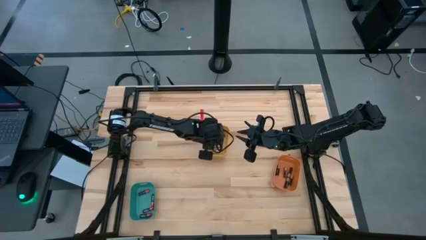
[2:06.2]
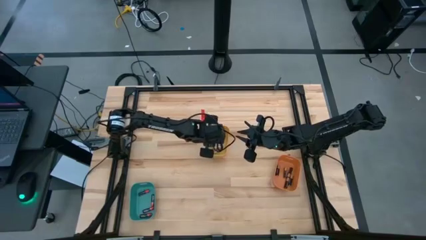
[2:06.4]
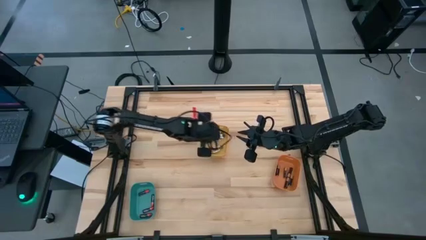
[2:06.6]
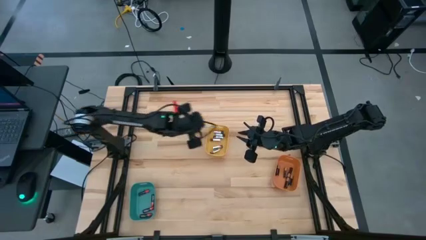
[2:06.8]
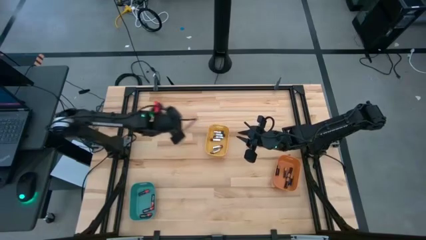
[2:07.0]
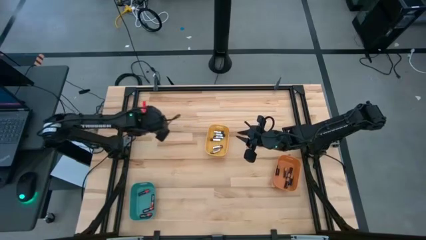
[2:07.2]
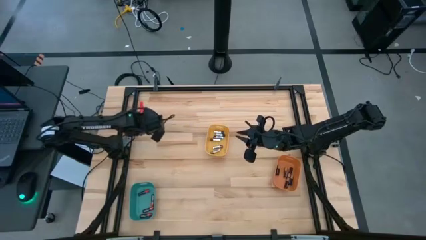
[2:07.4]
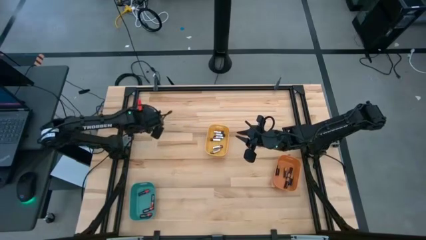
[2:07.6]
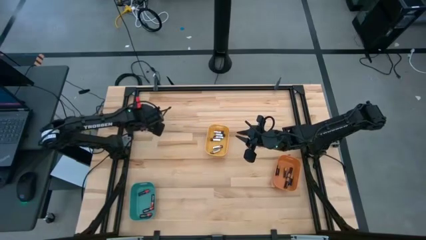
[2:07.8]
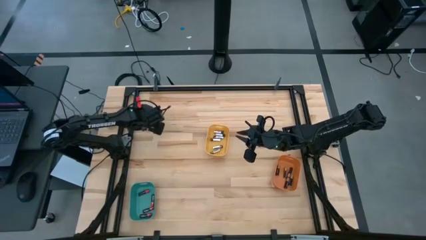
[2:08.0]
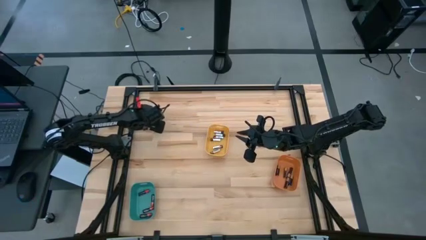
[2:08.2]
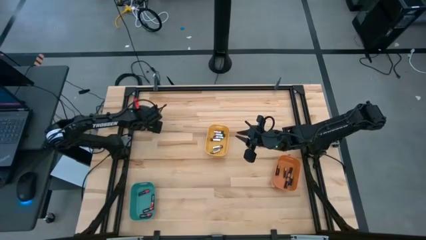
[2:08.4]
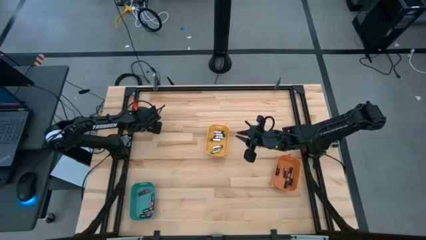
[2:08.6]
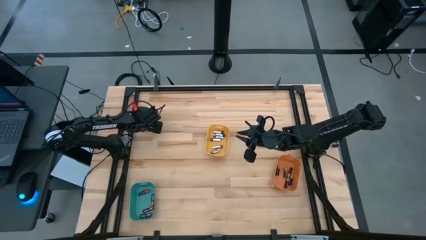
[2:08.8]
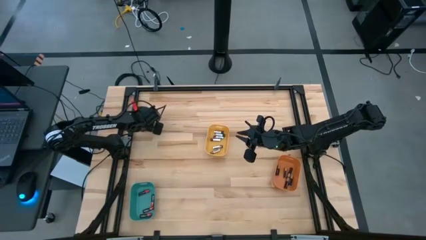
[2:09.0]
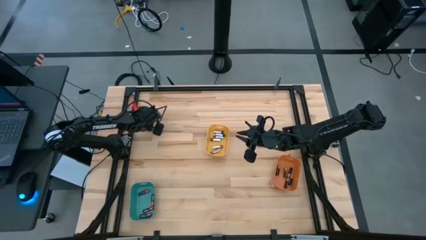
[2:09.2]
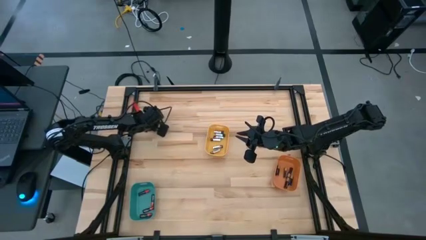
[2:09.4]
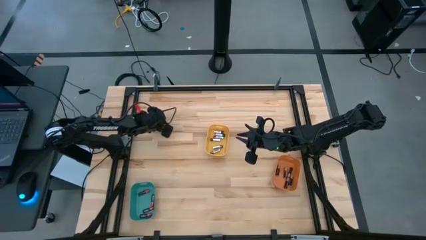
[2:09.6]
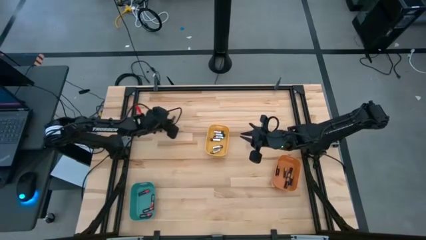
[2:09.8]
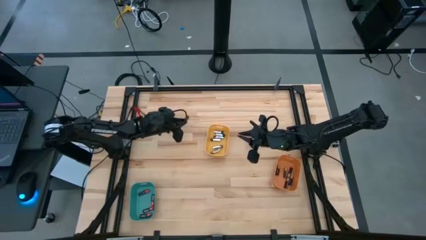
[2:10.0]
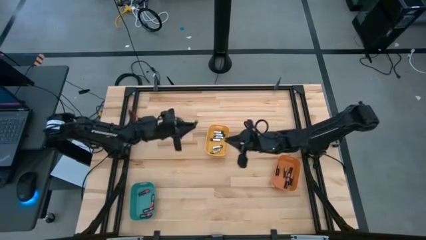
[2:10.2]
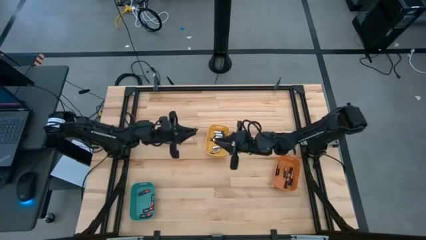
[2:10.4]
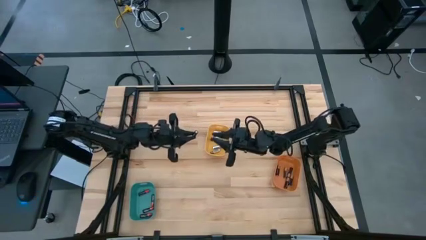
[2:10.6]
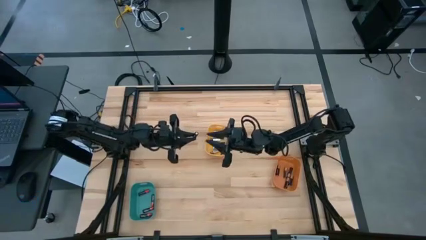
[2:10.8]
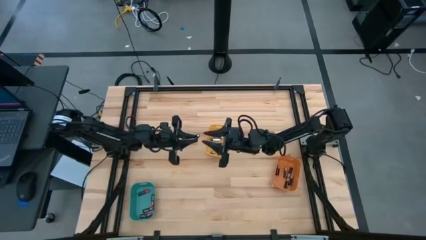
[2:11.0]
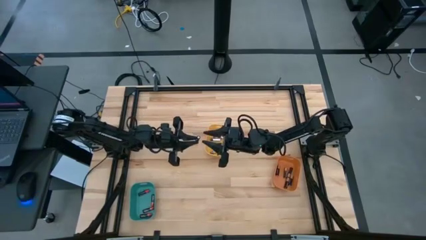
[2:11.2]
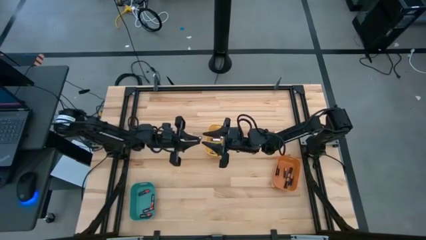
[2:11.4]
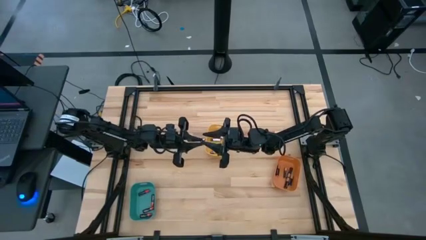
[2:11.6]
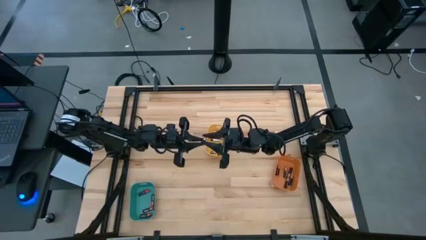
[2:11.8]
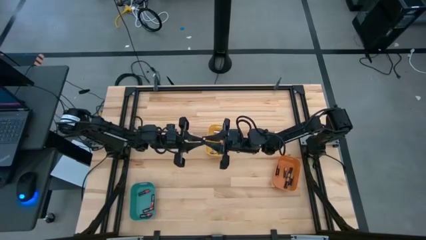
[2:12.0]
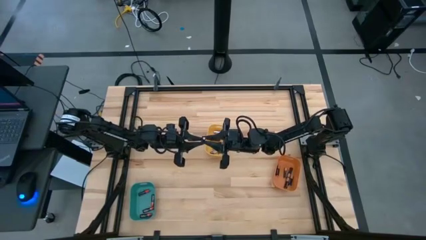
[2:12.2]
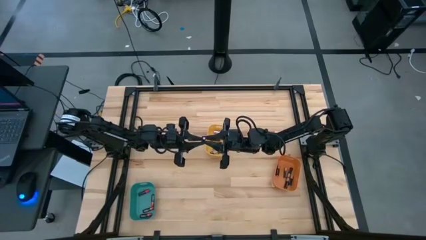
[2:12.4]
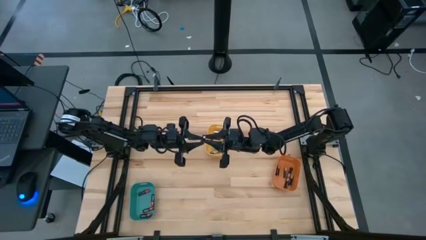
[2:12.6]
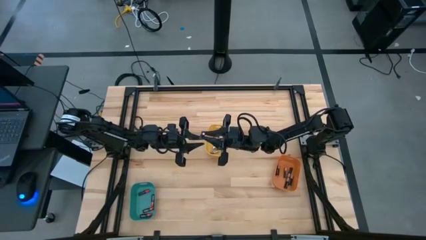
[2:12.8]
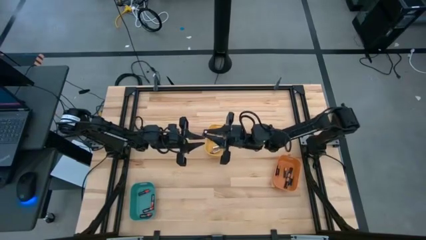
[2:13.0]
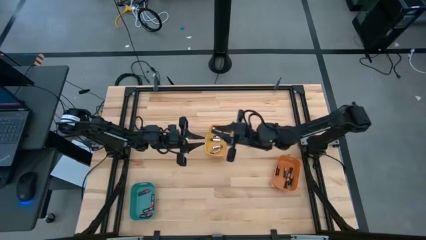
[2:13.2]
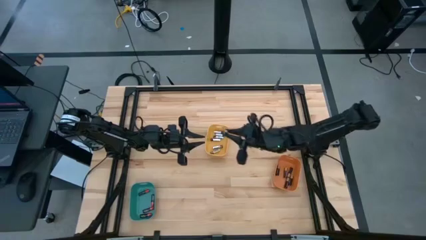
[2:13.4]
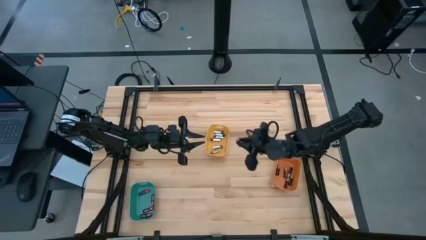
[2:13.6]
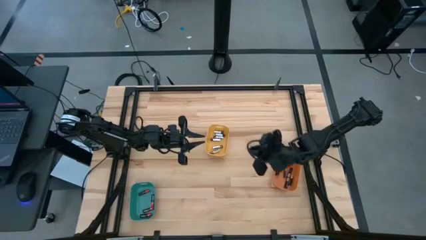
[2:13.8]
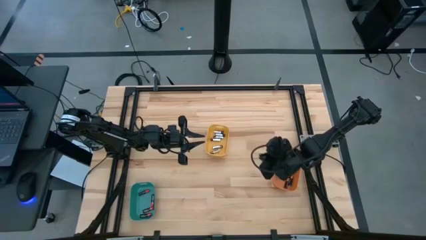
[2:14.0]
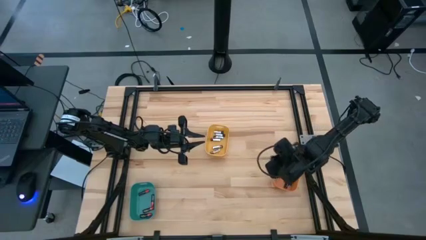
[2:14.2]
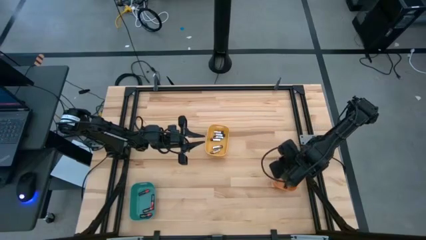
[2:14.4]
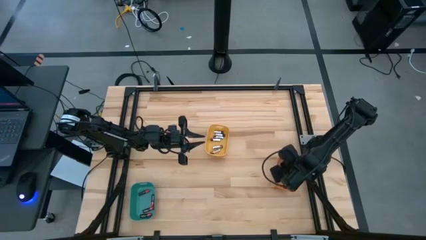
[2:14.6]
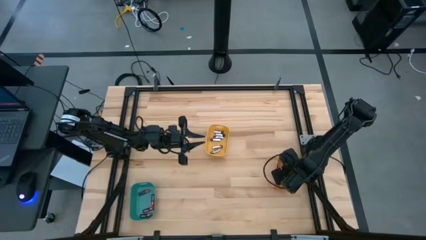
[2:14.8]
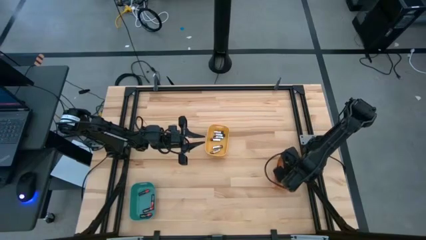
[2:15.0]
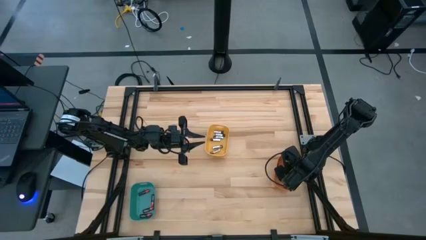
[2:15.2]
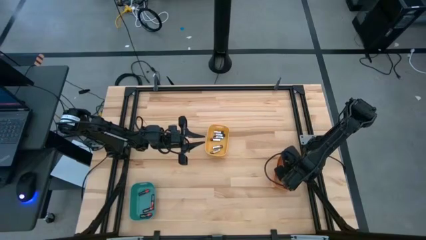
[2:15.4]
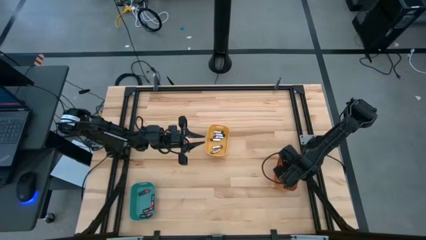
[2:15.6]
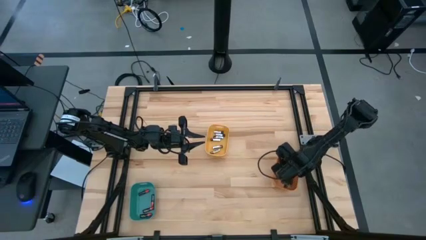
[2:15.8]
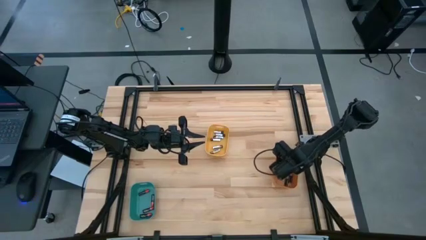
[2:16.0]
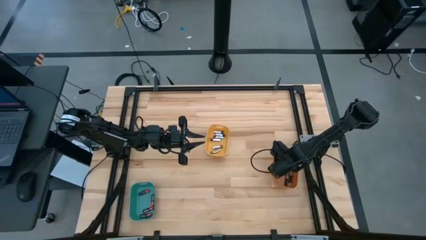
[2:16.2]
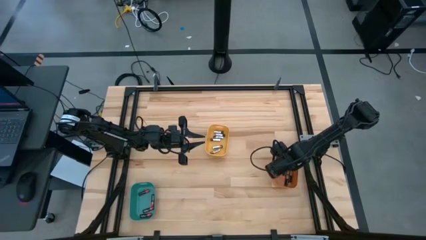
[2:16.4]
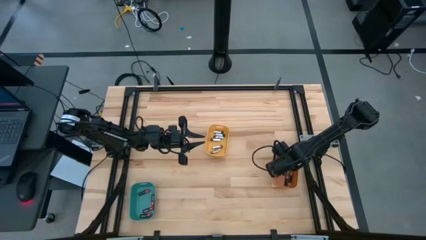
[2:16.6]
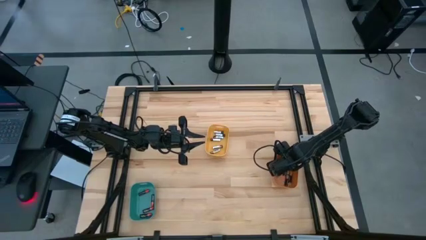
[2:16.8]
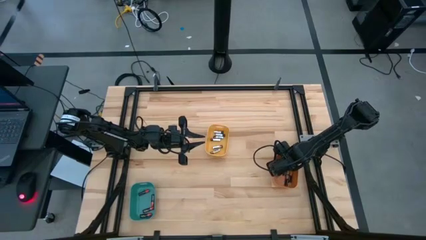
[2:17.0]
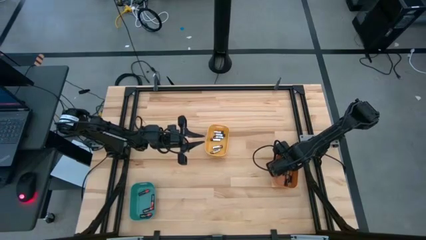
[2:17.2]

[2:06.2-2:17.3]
Task: Sort batteries
Put the brown battery into the orange bin

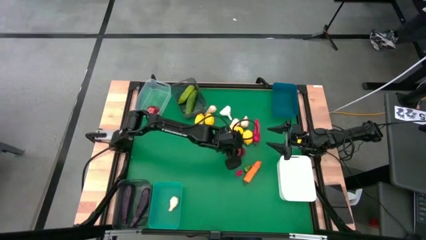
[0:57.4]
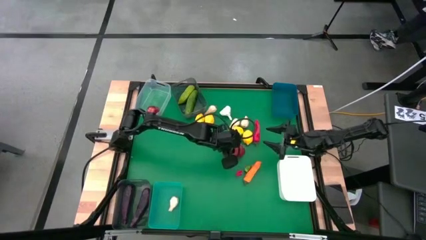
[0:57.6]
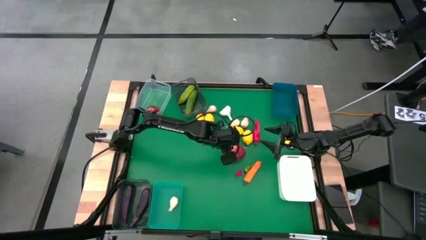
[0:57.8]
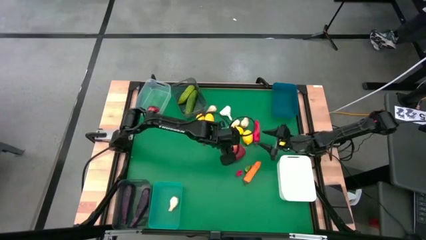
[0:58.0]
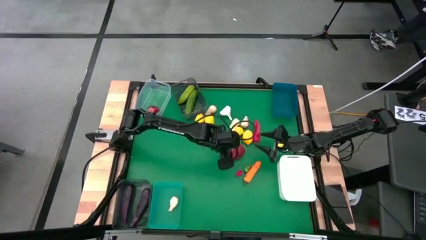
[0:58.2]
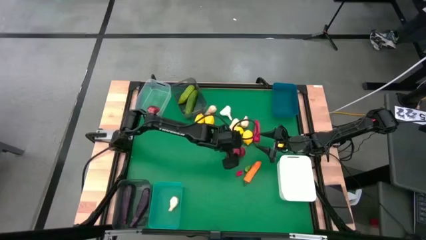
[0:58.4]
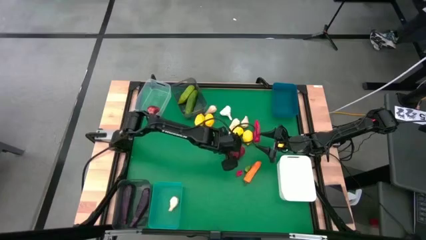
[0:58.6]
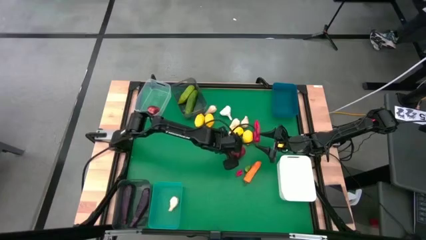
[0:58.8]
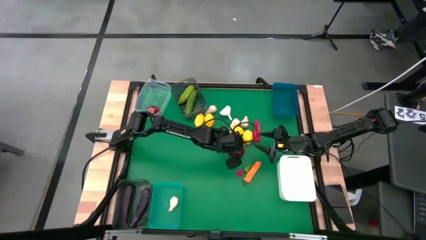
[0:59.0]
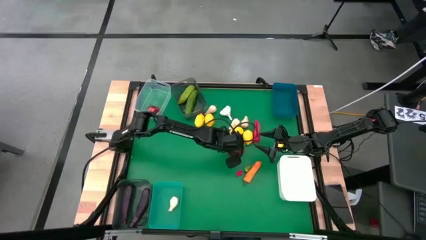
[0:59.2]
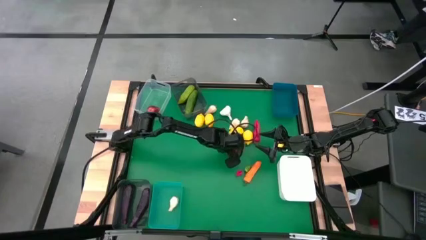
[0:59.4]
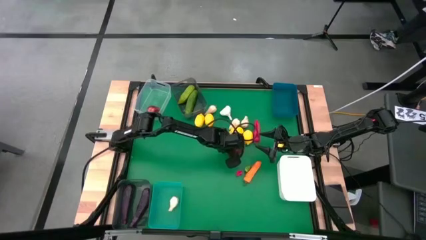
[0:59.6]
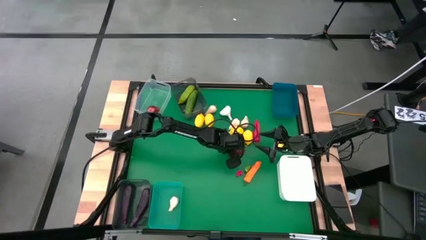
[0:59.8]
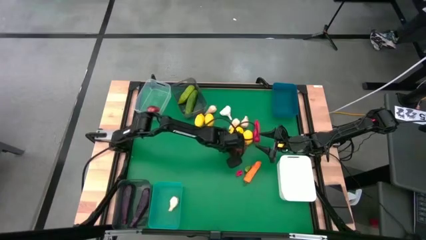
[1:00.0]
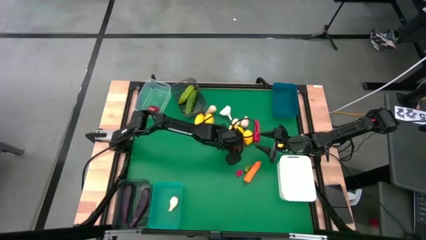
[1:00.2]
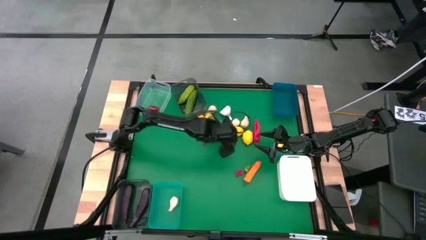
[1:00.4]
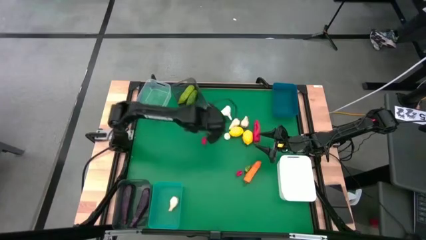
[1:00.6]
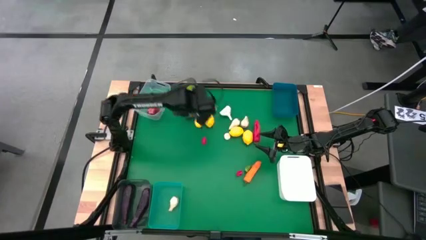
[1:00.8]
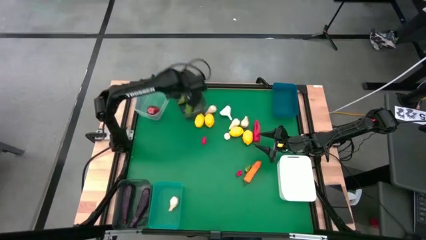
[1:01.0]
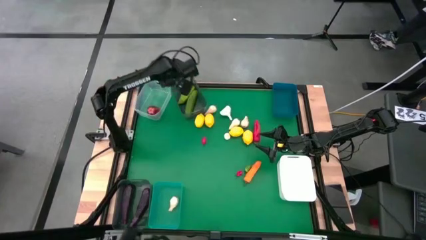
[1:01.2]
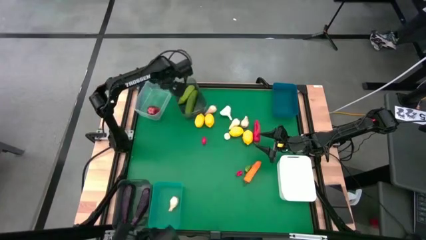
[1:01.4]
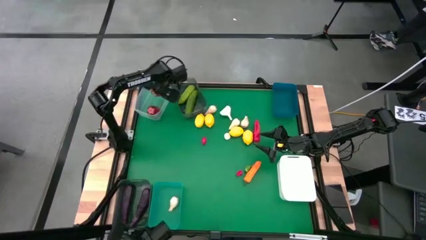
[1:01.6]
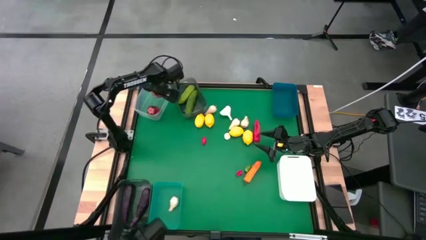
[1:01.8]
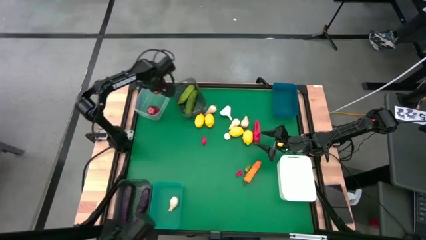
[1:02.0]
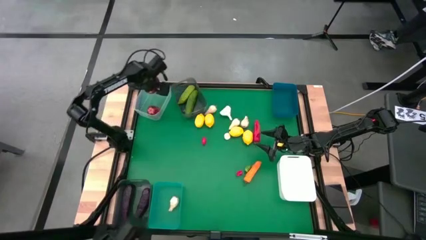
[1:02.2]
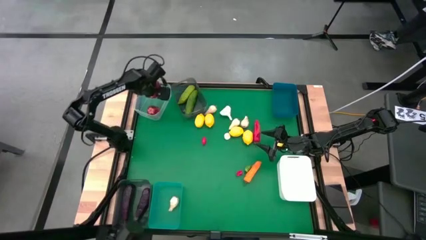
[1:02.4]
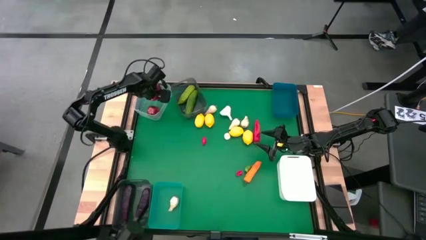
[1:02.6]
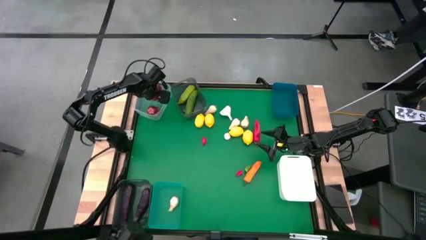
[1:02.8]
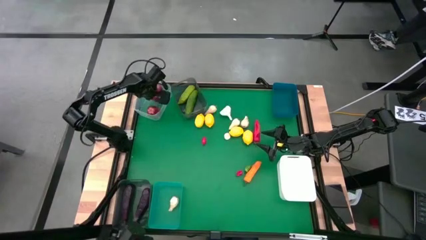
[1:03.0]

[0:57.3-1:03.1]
Task: Sort produce into baskets
Put the apple into the transparent bin
